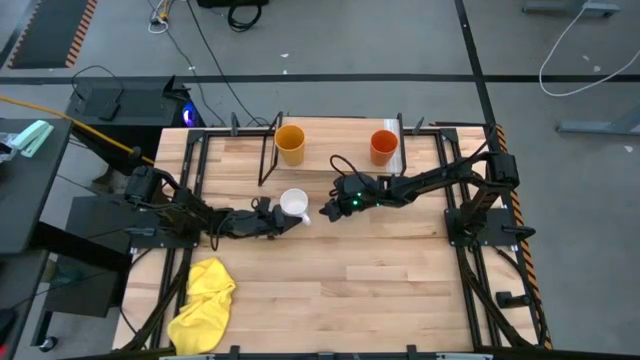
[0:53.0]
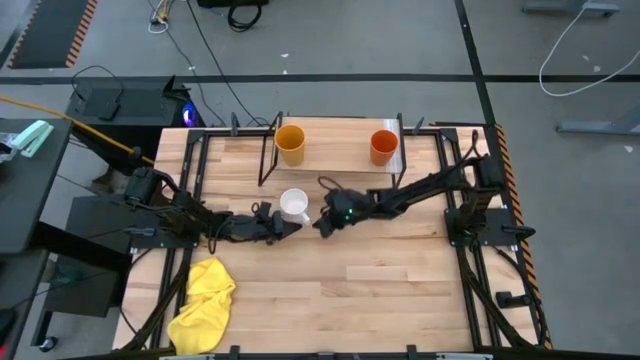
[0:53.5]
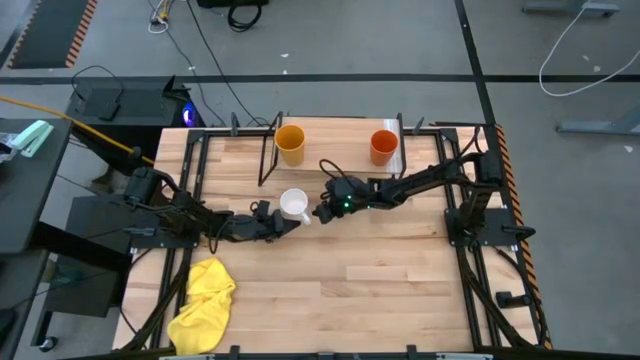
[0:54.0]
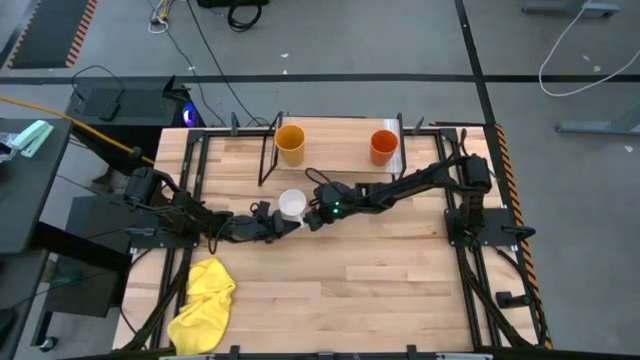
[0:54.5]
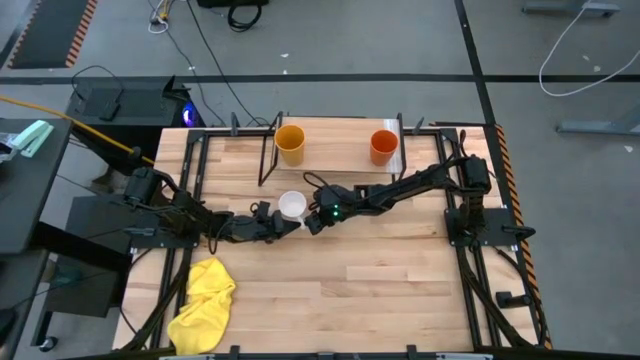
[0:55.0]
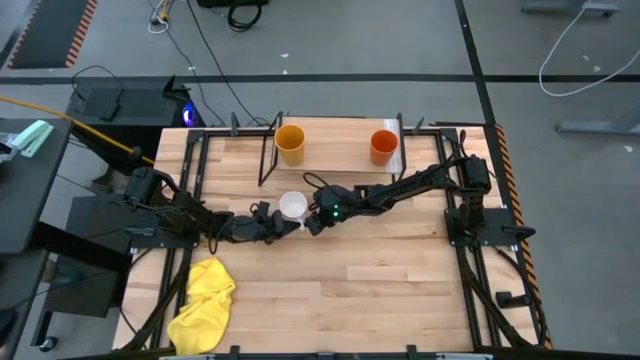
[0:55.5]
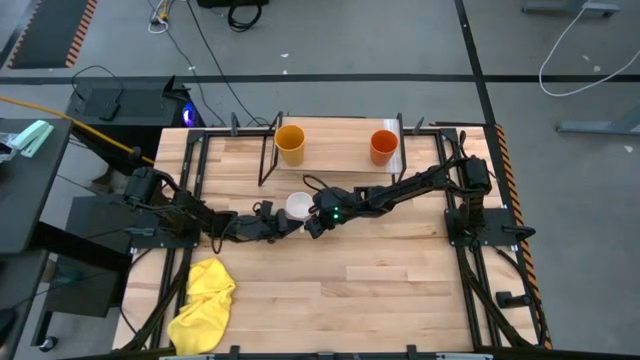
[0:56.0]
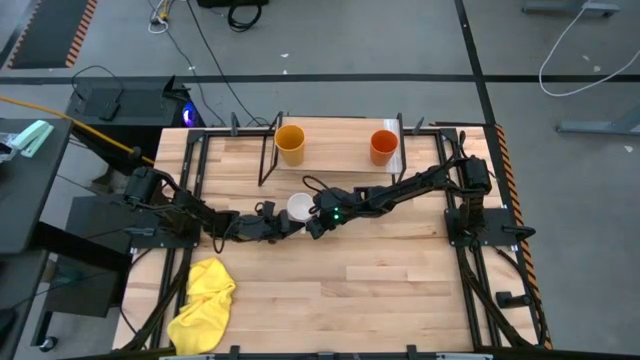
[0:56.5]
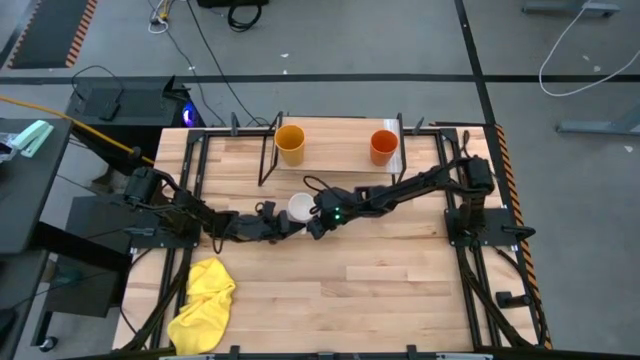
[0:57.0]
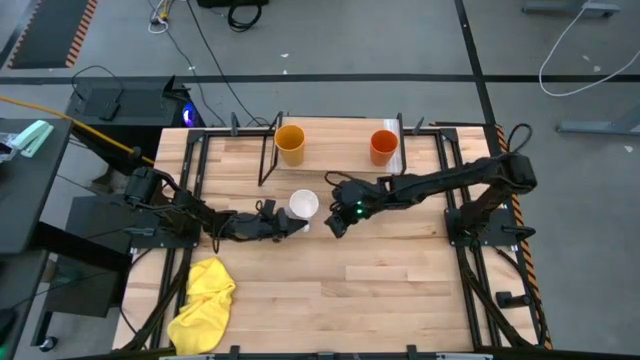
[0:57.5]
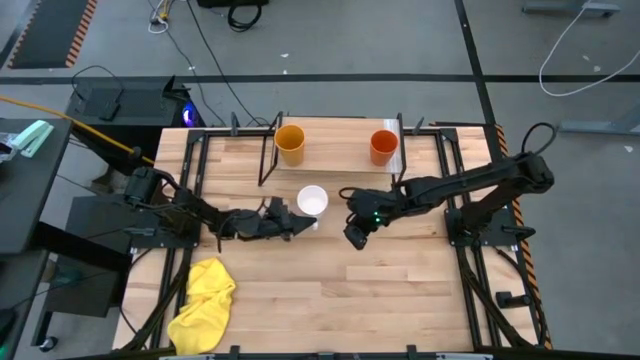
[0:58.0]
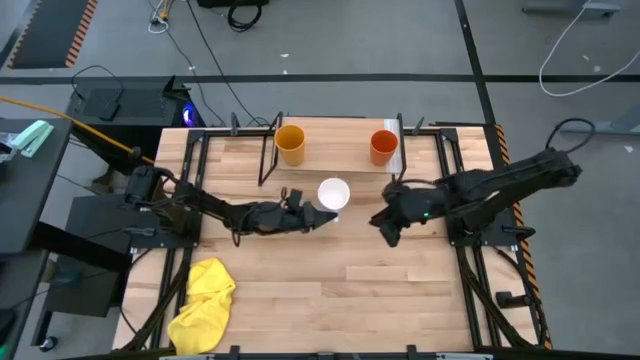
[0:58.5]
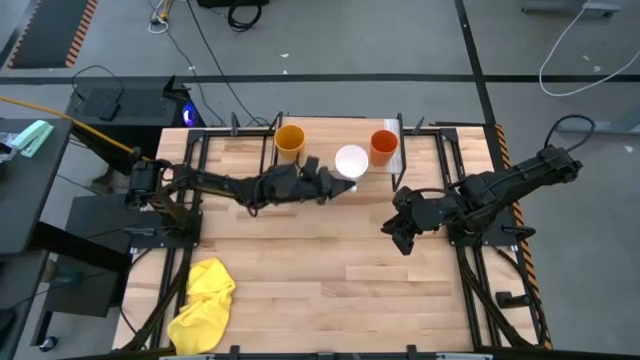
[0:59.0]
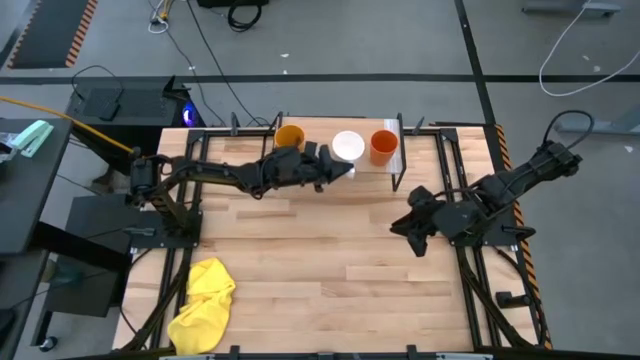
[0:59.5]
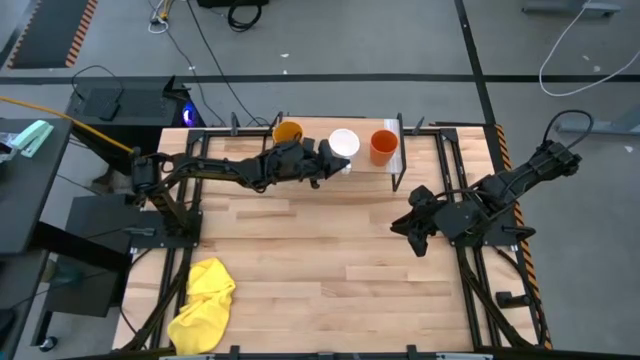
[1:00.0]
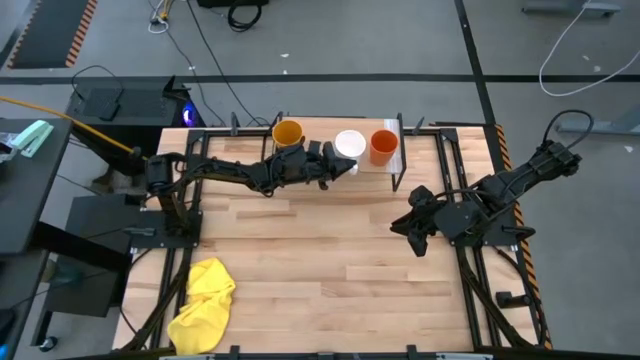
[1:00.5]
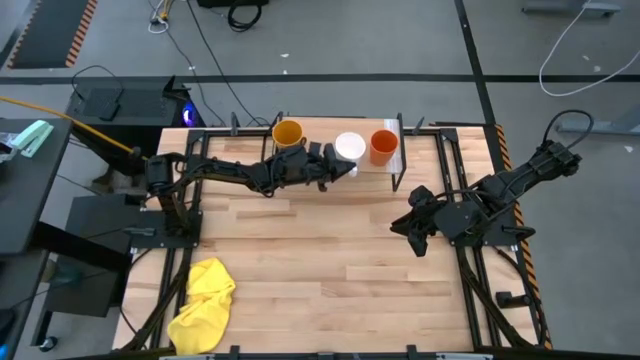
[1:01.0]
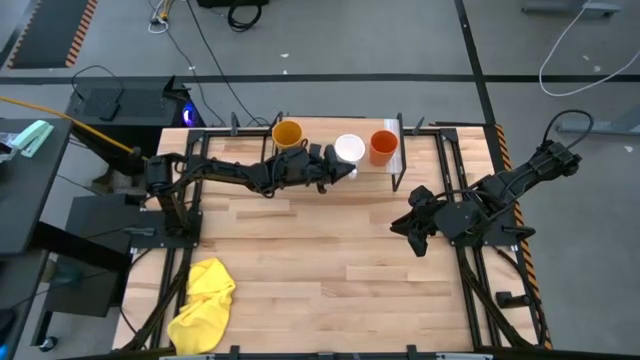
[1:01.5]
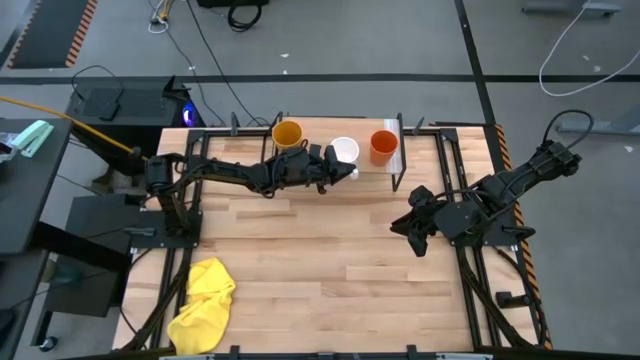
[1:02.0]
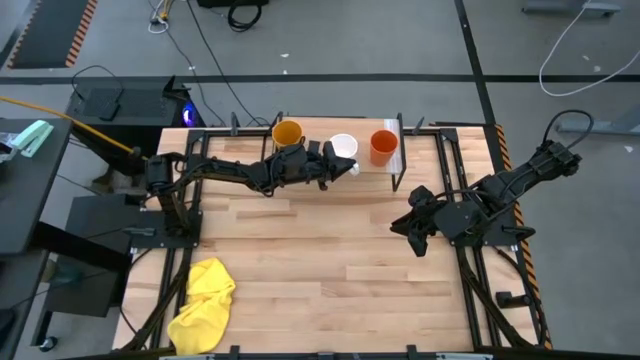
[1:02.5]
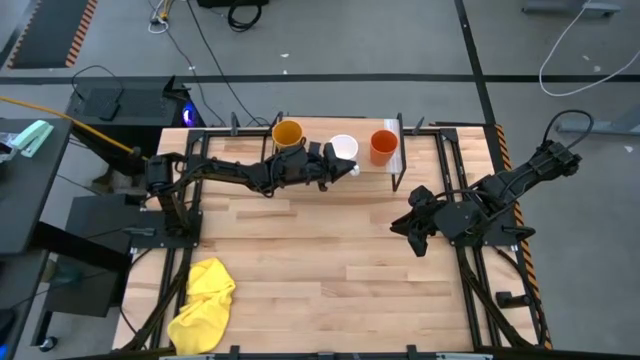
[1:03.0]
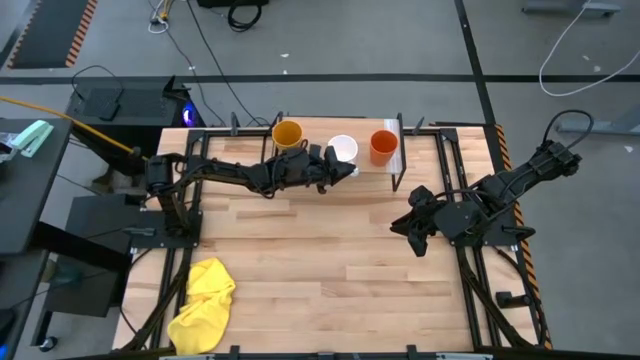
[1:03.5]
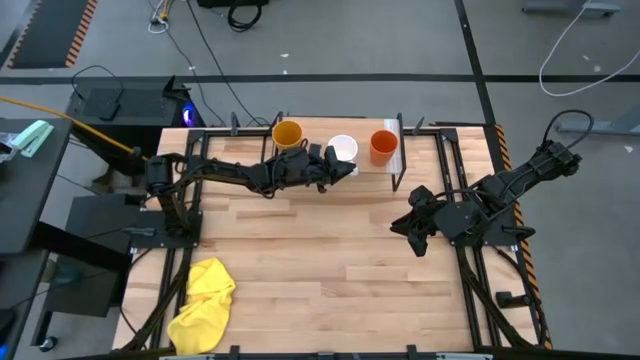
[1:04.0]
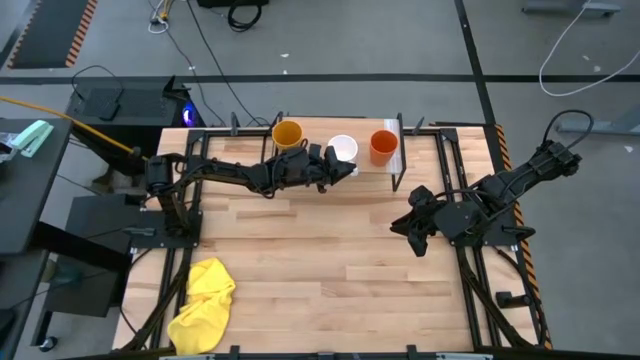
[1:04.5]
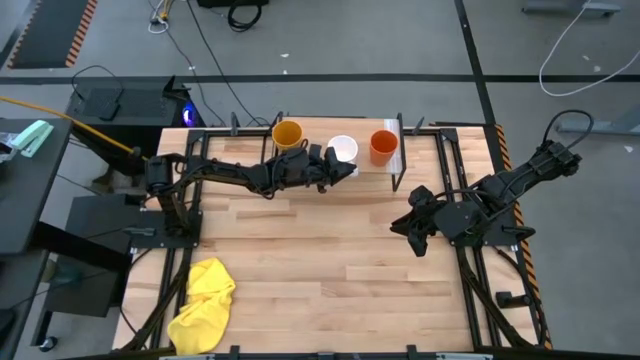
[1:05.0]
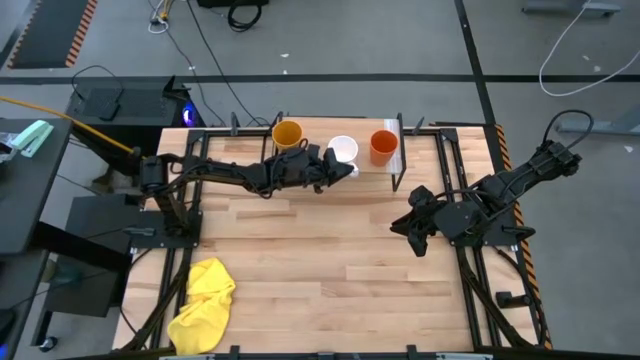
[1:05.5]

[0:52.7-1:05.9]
Task: Stack small to large cups/mugs on shelf
Put the white mug on the shelf

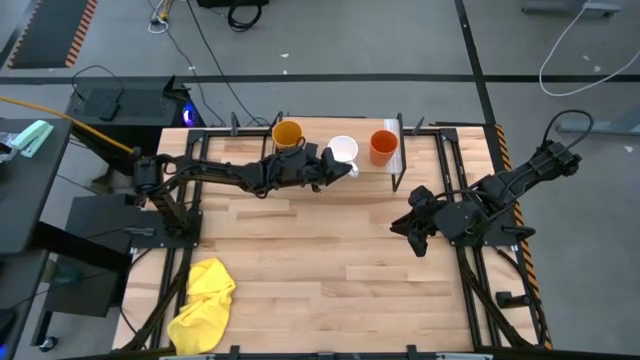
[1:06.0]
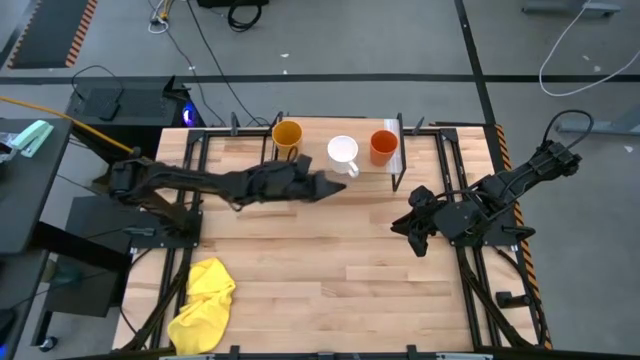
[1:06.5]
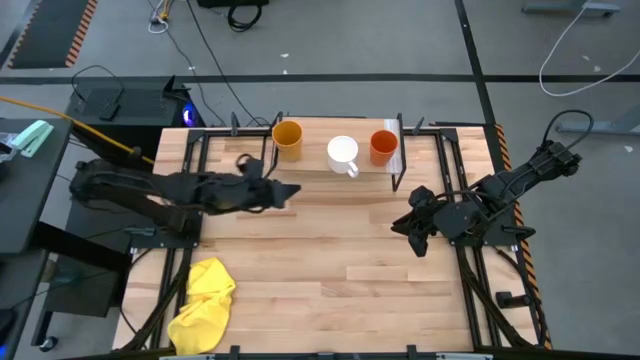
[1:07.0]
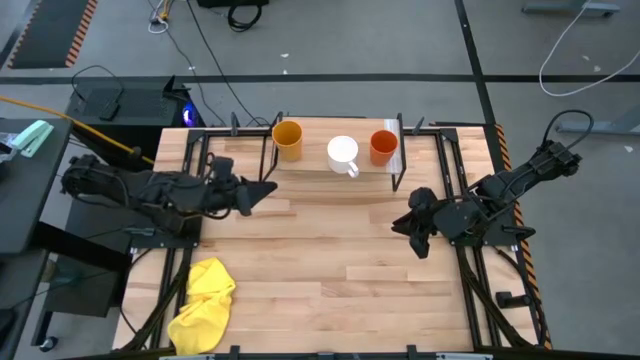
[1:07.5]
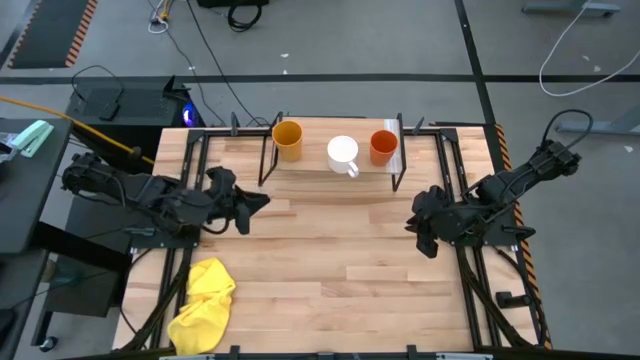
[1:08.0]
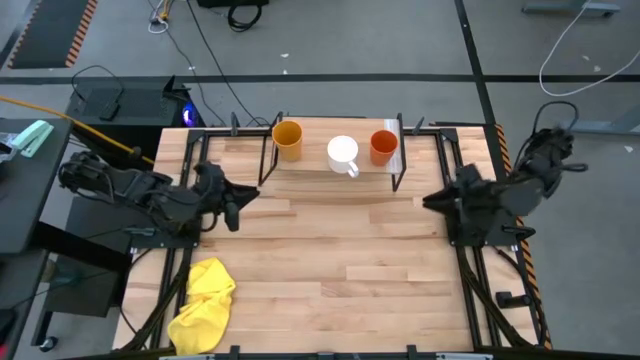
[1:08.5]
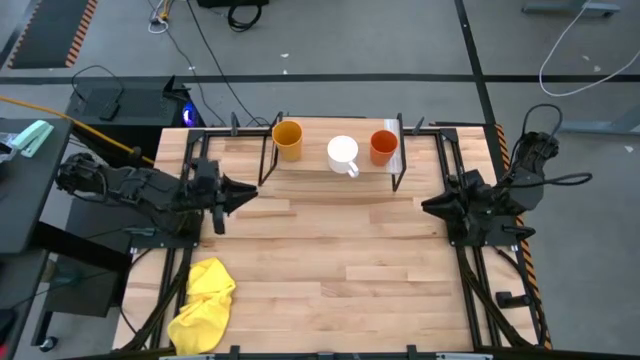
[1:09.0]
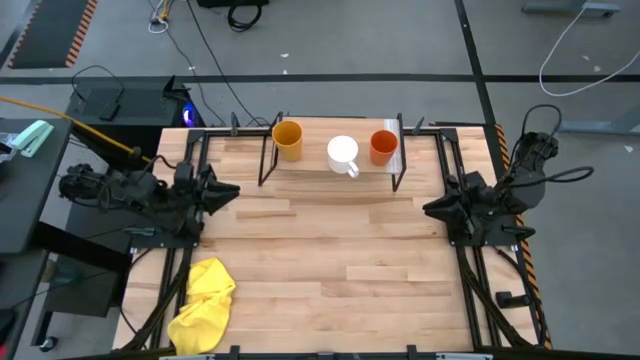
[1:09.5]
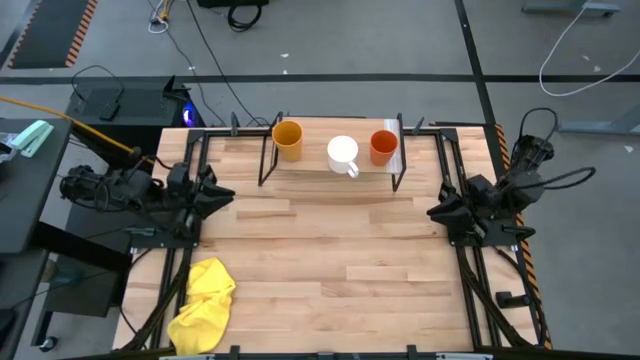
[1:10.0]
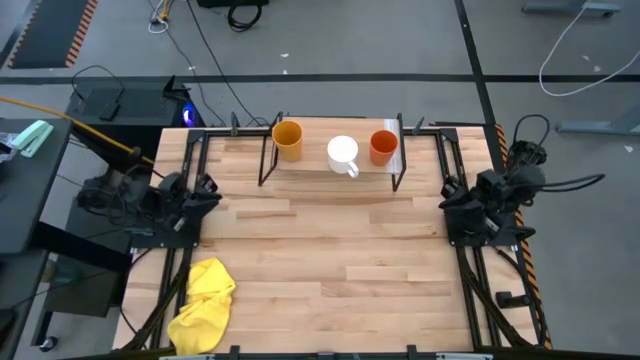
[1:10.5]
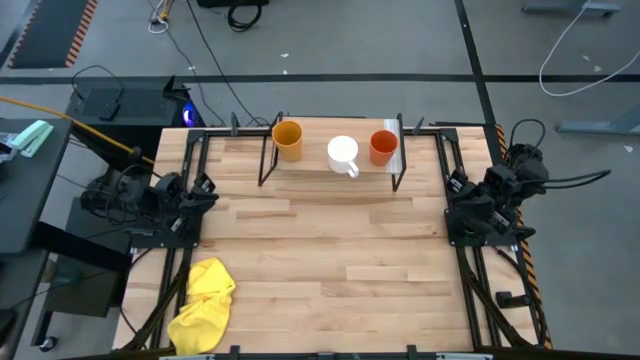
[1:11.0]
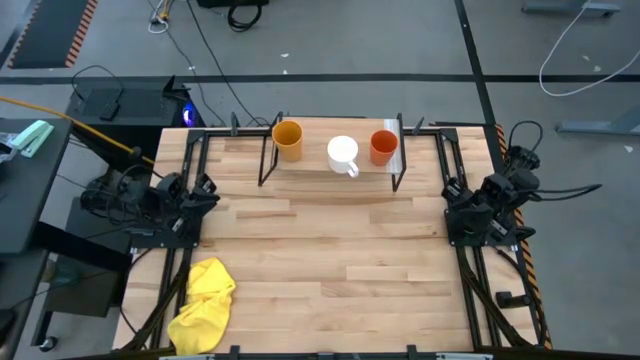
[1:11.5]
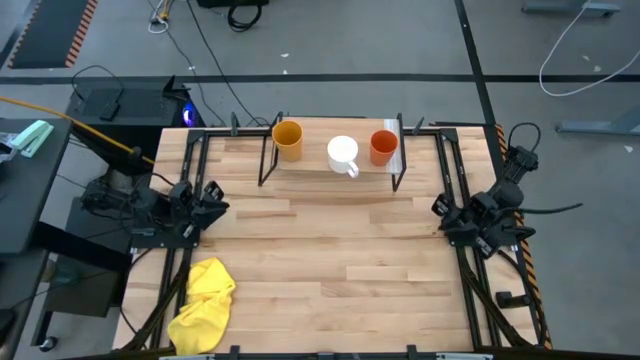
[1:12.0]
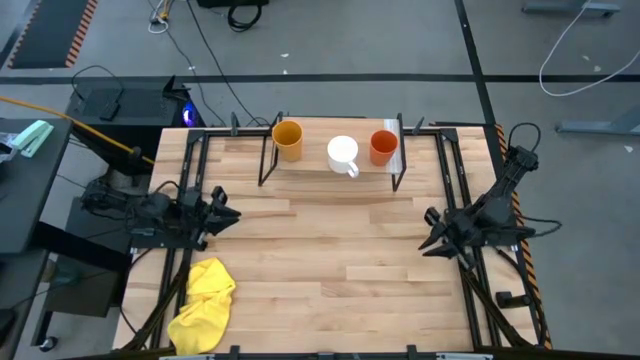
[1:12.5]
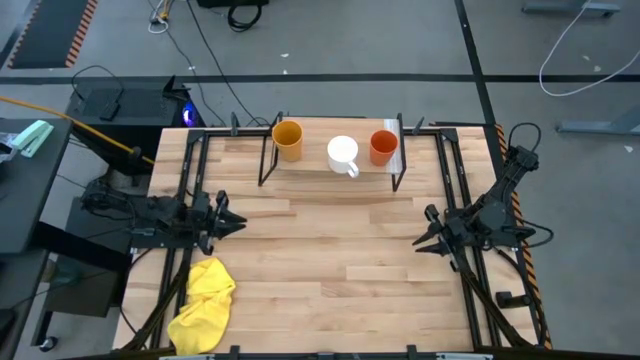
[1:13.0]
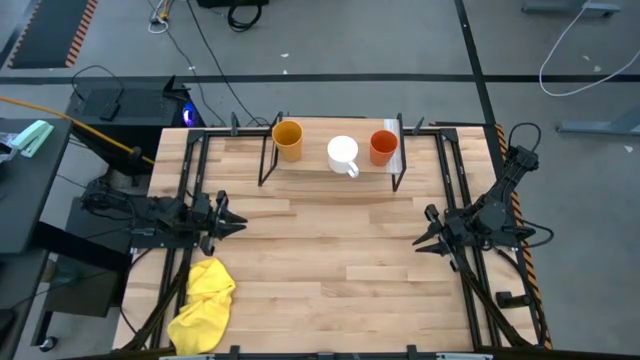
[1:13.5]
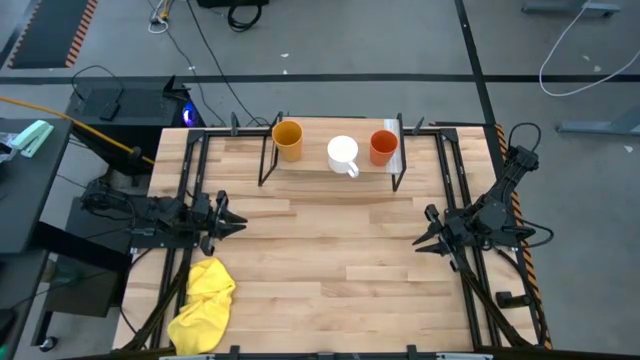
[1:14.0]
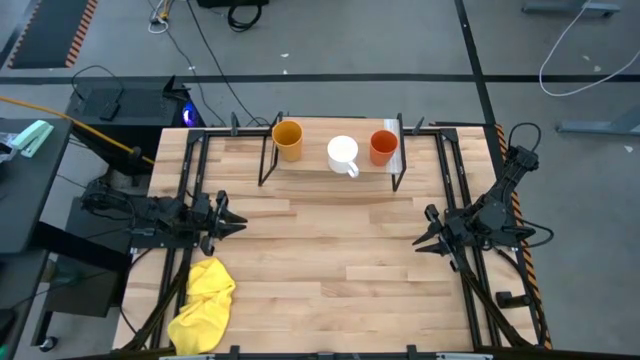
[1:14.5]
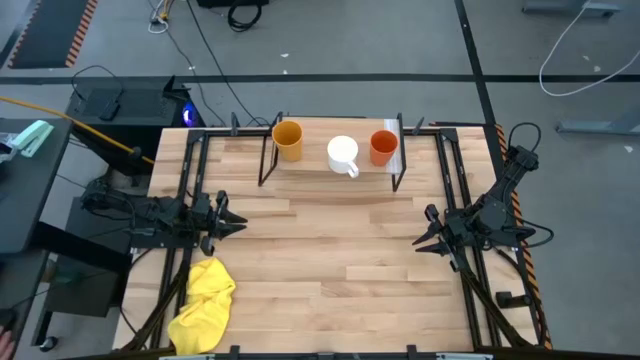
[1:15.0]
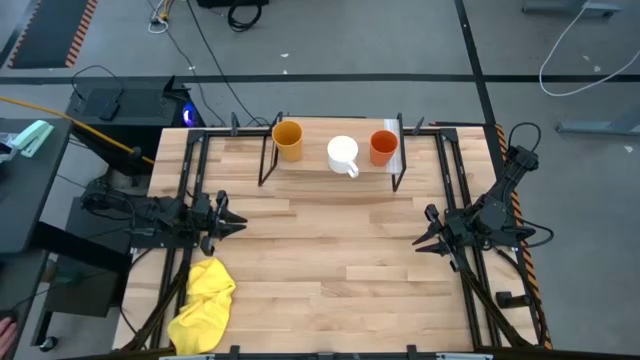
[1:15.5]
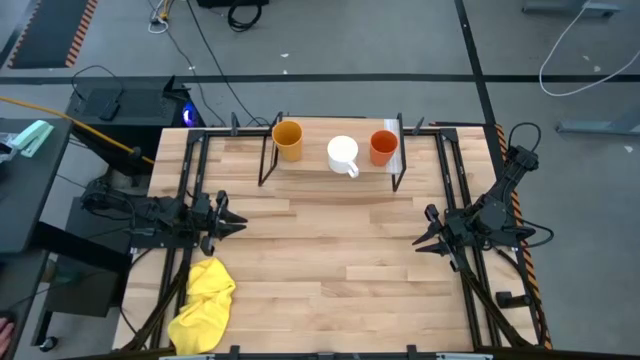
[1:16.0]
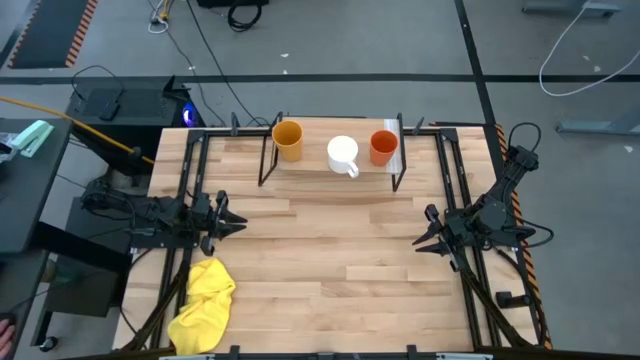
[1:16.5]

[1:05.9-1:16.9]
Return to Home Position
